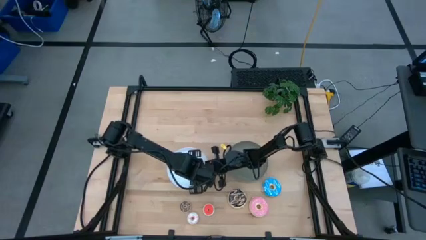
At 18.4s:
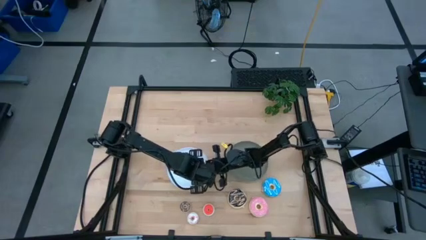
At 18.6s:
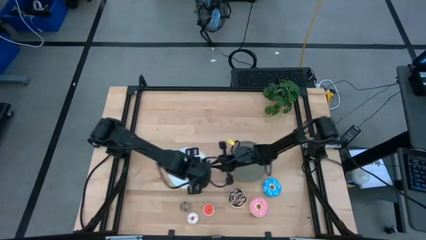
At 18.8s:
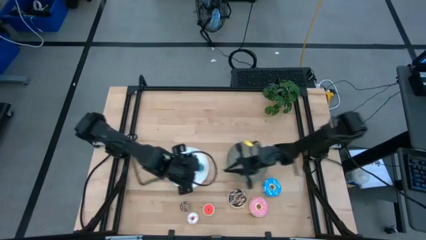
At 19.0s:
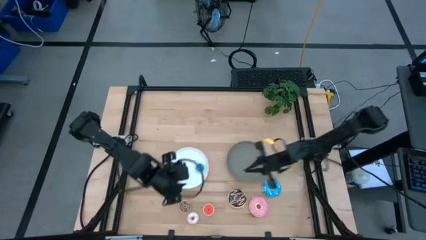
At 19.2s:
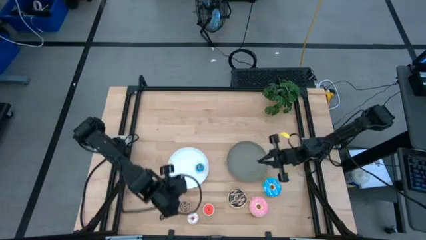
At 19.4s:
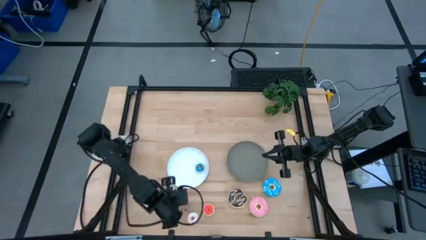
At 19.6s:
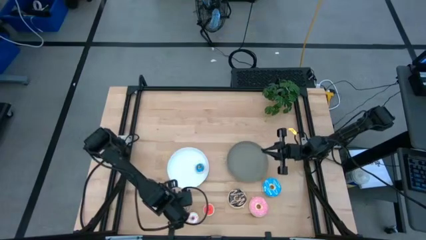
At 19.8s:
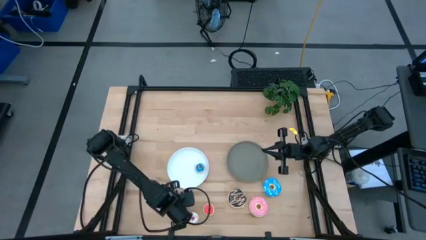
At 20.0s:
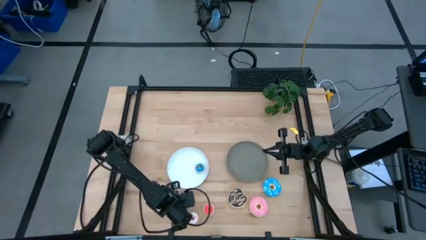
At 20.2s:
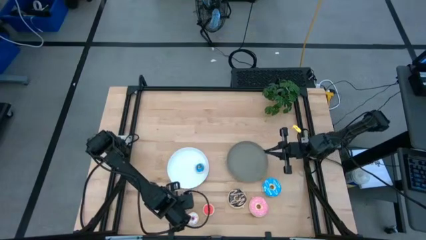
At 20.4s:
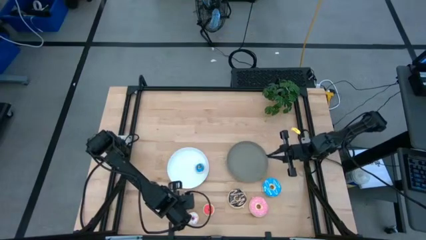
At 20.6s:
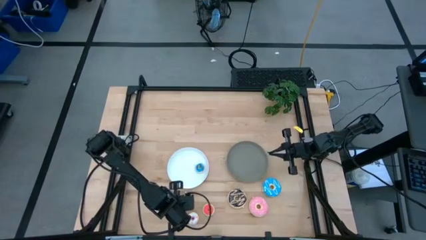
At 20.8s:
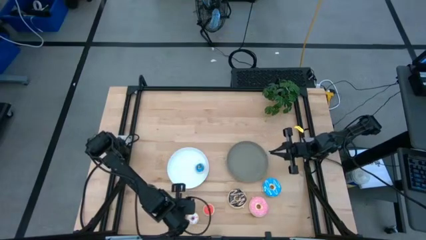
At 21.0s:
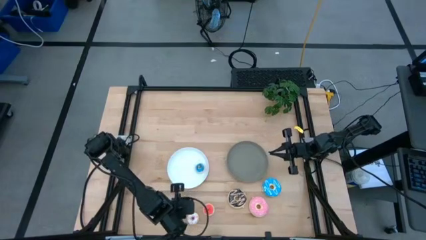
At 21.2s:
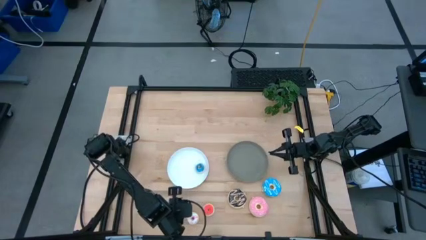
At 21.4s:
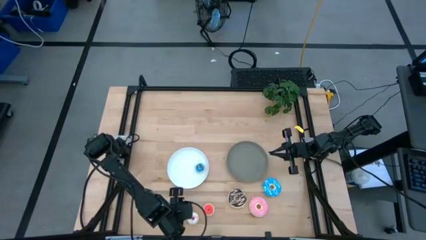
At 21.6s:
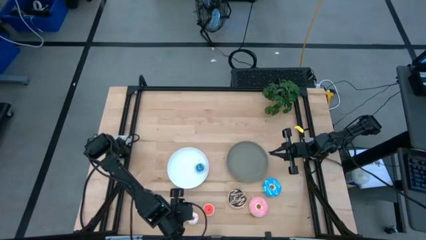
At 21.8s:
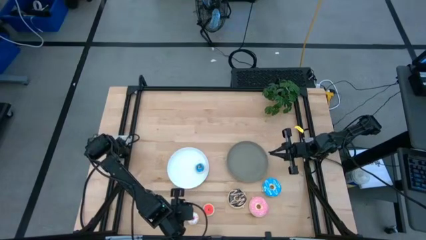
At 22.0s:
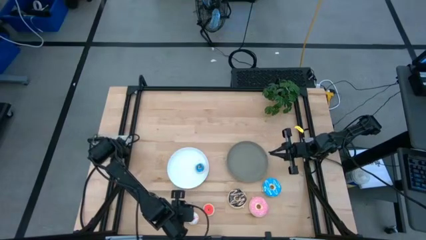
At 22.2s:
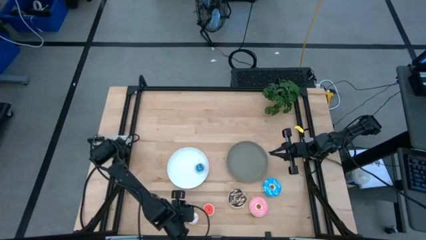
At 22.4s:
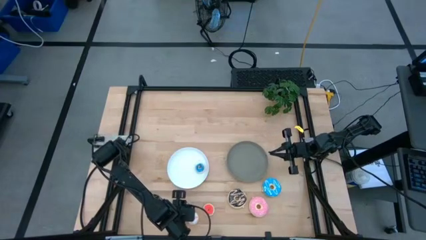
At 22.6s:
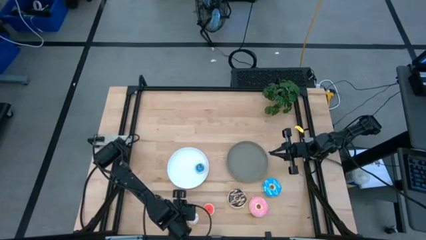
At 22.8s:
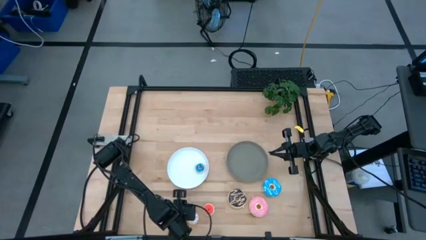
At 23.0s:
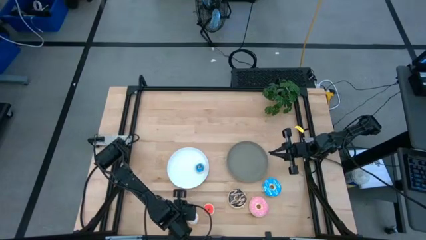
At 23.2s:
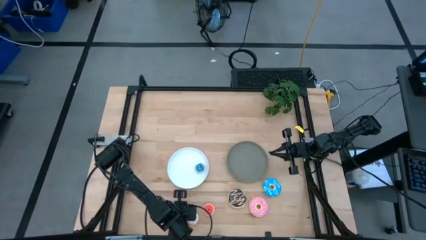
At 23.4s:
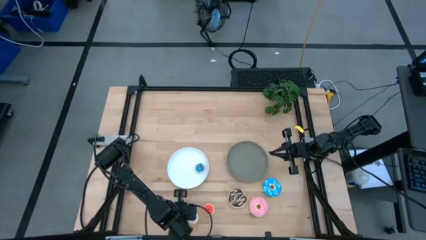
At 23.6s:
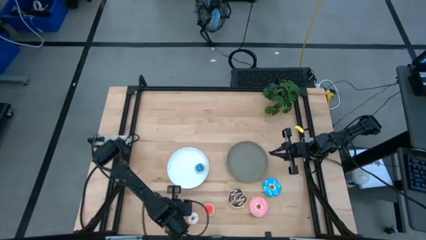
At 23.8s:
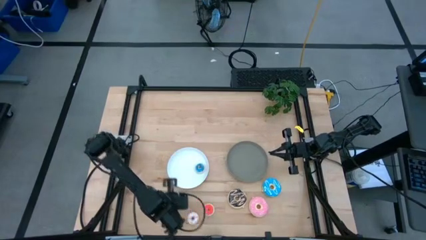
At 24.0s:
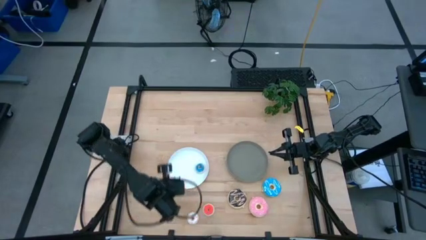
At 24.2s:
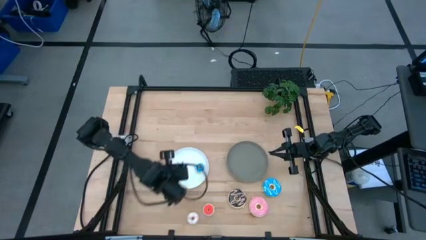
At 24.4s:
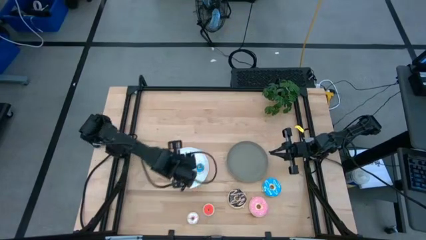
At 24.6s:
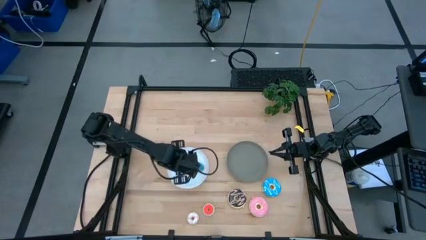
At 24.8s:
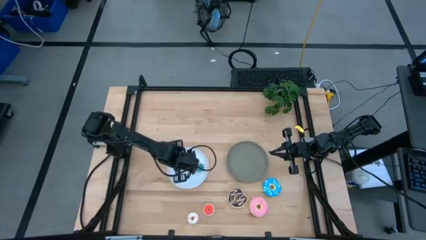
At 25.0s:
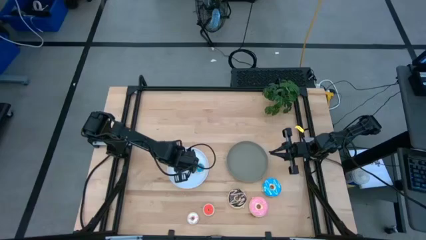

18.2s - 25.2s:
Task: Pick & Place donuts
Put the small brown donut on the white plate

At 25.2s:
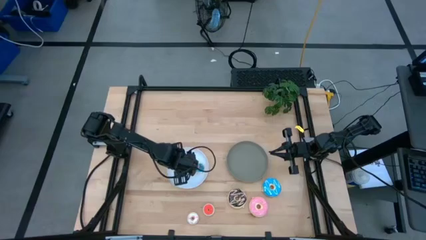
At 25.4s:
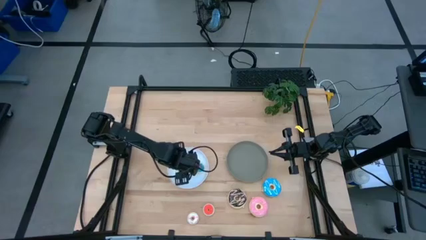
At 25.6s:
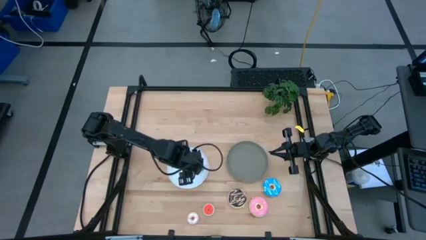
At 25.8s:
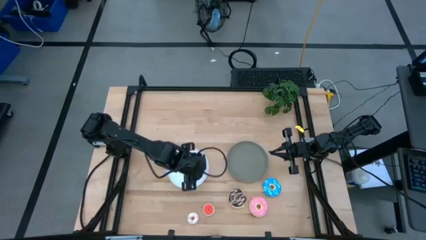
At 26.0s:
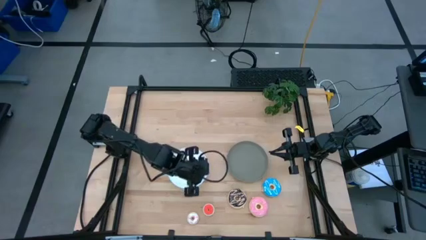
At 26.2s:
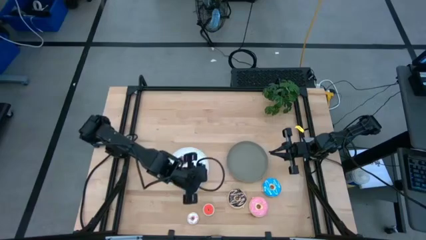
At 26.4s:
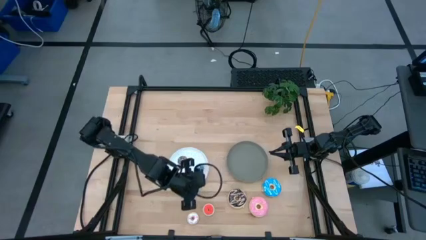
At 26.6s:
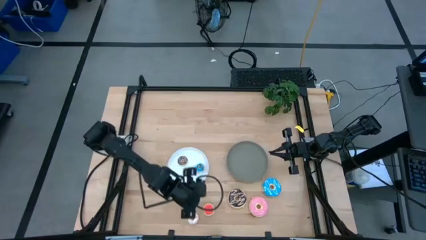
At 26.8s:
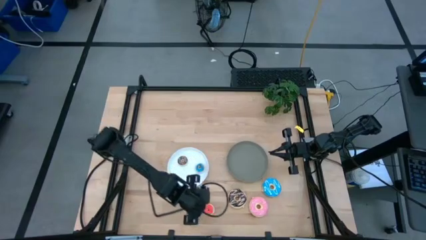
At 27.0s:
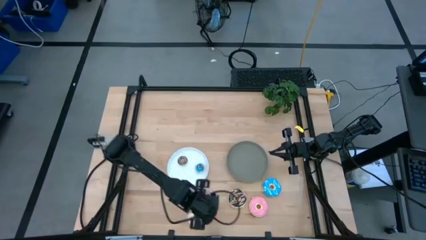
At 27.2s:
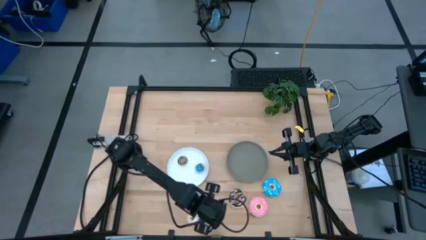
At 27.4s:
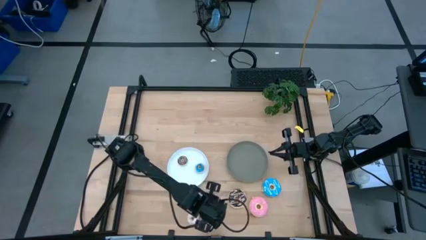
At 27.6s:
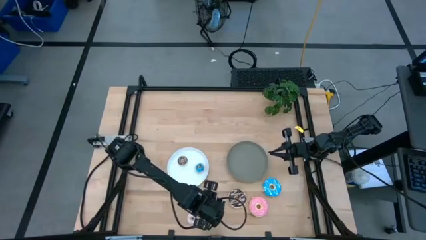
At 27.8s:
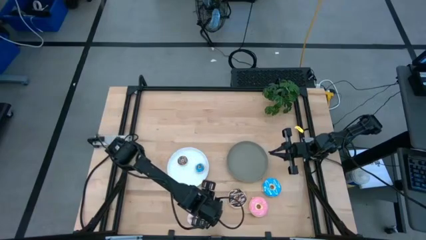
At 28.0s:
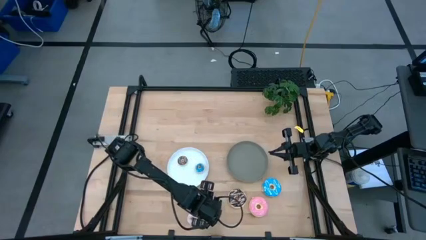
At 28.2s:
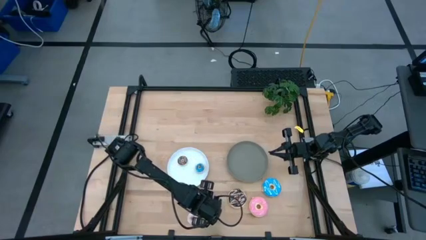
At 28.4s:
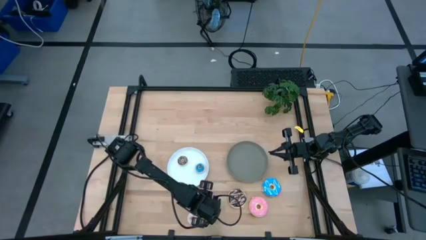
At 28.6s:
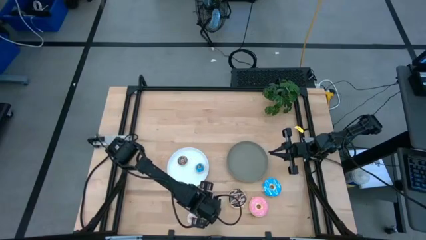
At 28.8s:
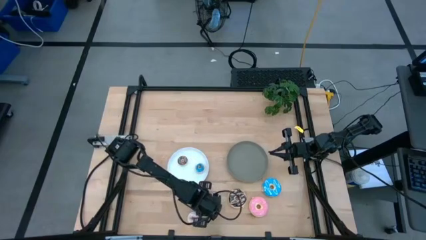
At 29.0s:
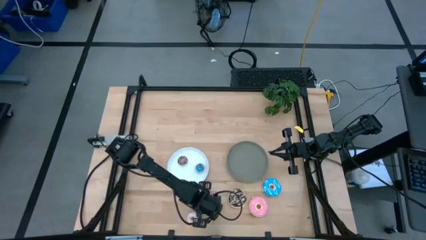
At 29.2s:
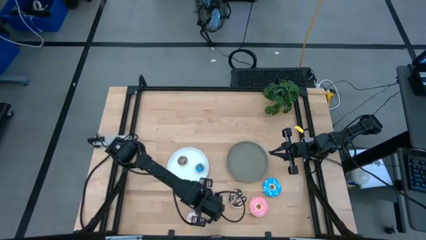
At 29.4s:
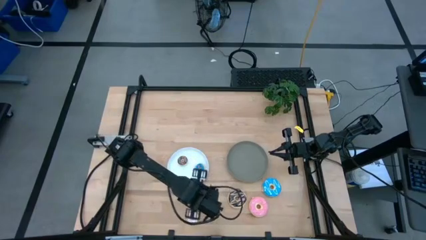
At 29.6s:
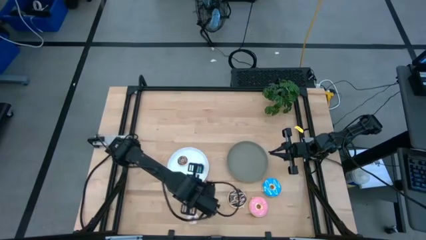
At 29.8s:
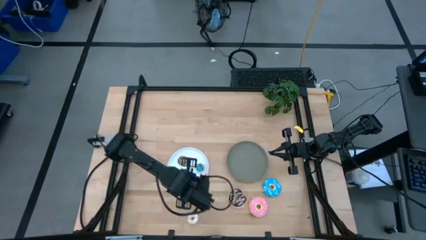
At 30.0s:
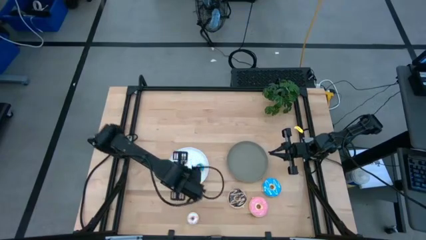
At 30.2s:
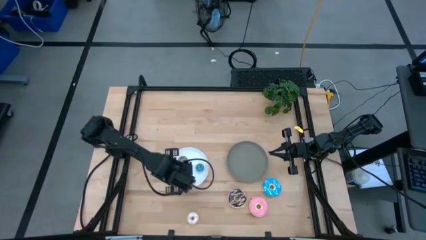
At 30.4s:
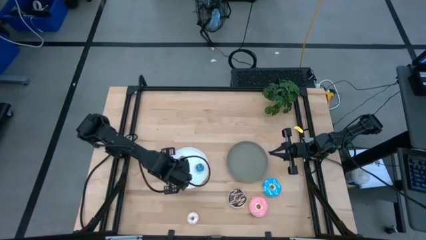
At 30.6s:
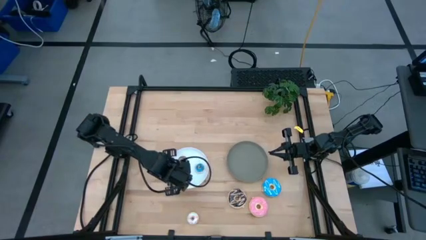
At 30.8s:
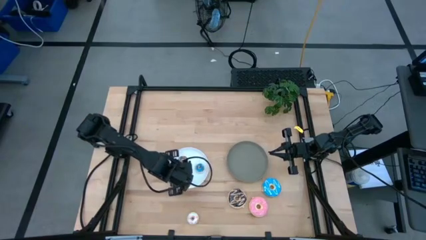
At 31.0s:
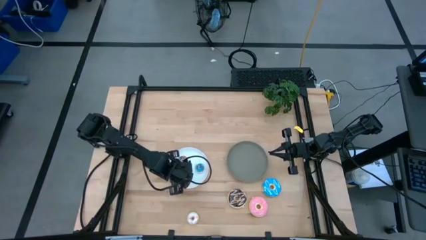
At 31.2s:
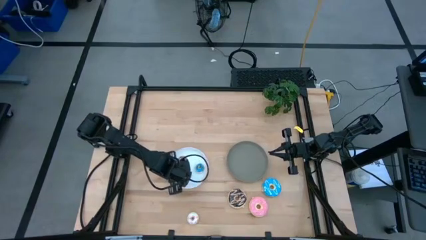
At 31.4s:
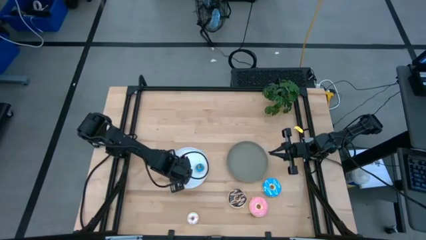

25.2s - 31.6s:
Put the small orange donut on the white plate

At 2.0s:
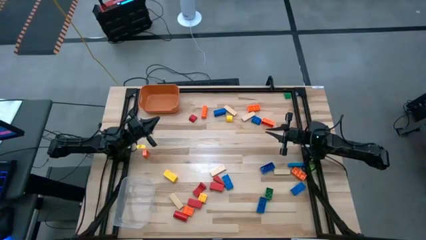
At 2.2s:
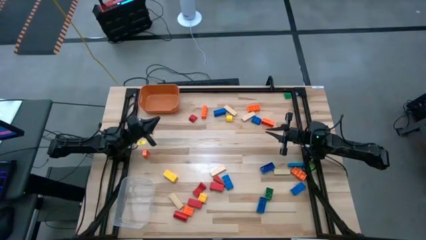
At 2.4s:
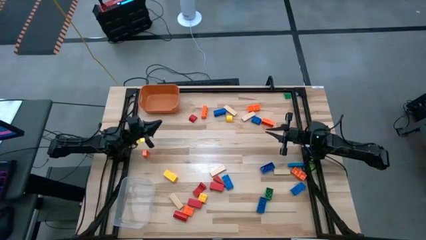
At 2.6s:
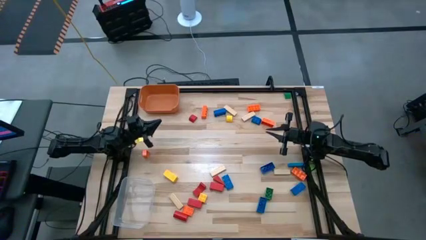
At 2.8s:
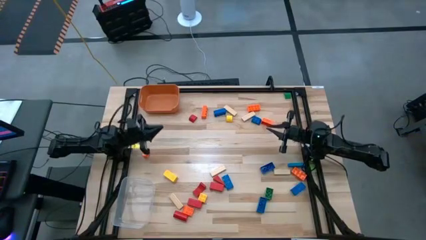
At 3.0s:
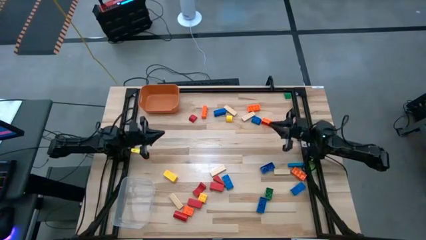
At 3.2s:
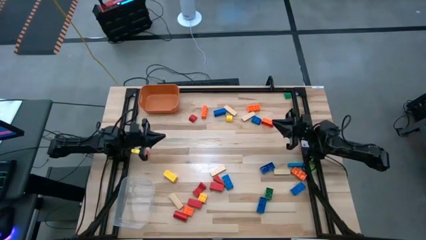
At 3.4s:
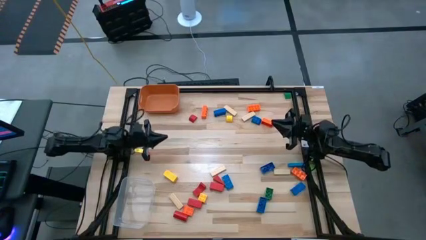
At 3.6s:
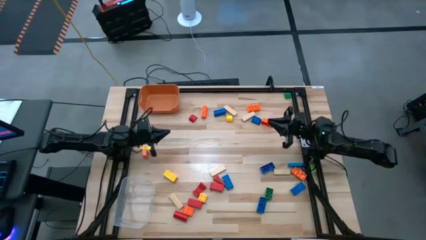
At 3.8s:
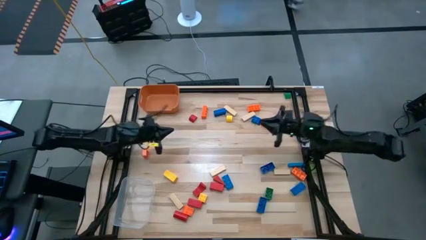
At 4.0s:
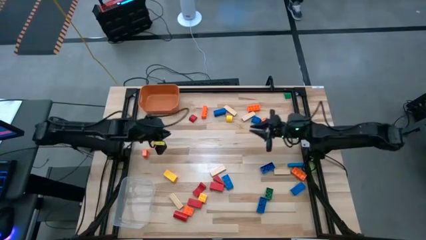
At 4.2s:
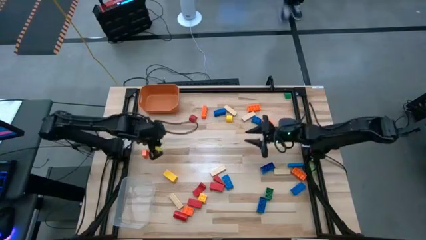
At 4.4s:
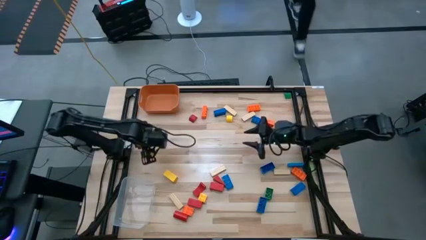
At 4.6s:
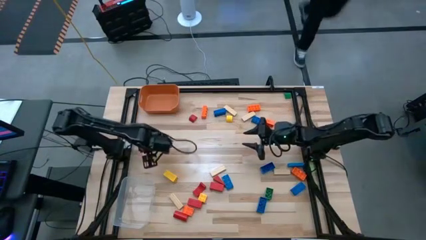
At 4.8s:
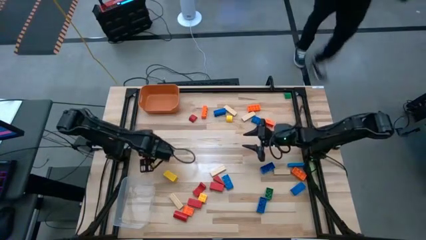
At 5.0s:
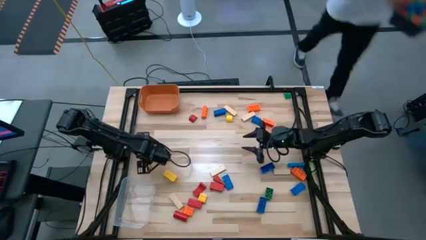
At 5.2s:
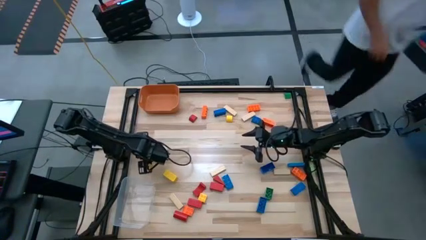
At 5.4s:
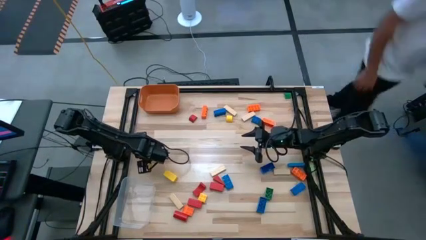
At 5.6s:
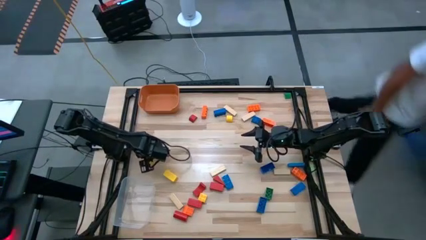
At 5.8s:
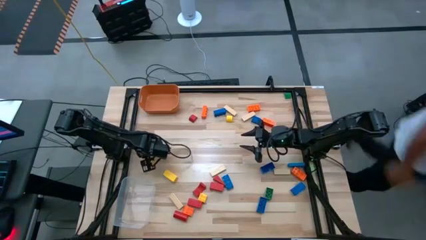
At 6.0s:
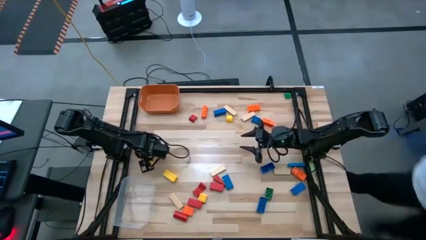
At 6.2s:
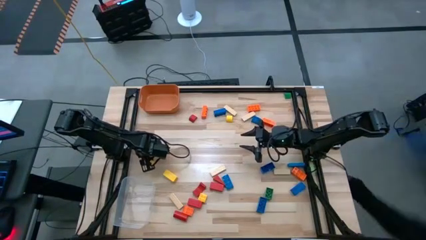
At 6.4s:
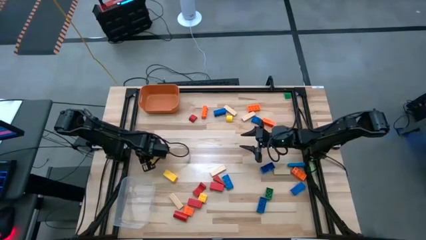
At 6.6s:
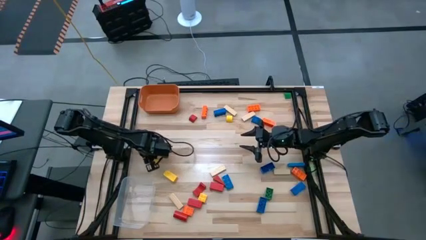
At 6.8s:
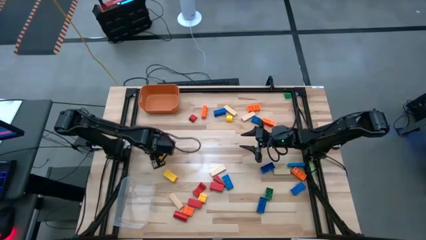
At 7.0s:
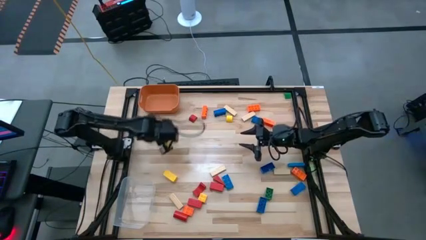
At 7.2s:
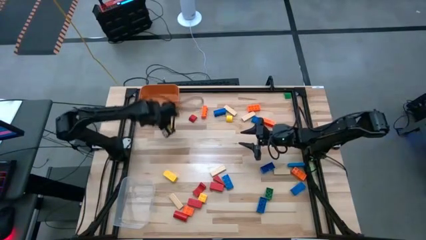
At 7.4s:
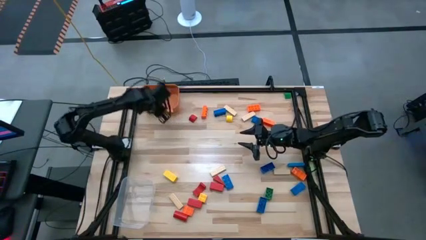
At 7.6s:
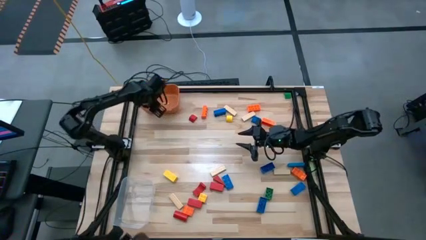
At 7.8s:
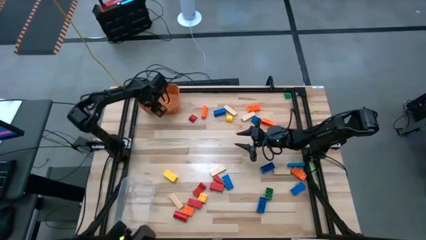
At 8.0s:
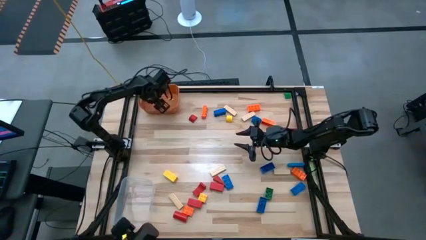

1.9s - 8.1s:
Task: Sort blocks by size
Put the small orange game piece into the orange bin
